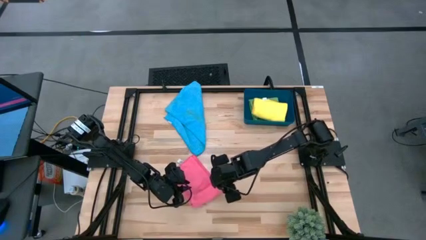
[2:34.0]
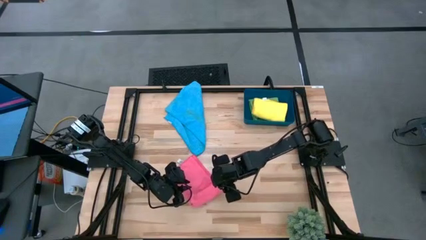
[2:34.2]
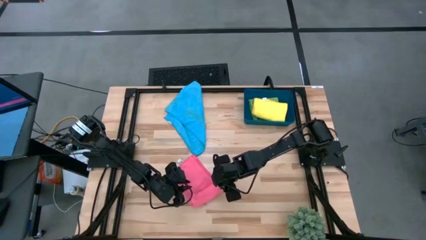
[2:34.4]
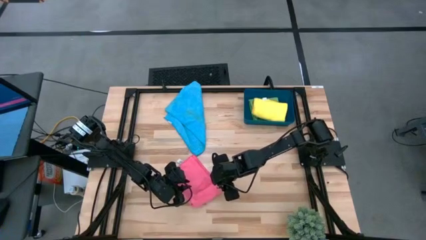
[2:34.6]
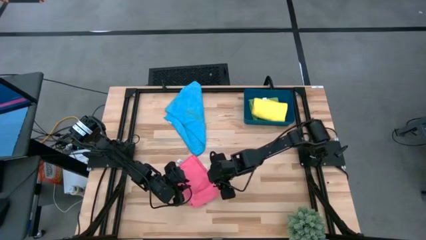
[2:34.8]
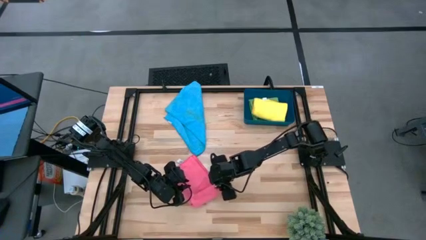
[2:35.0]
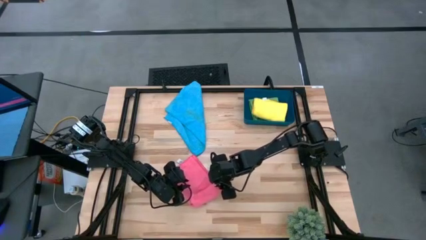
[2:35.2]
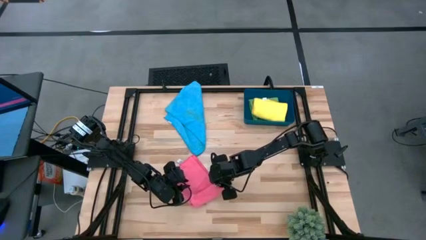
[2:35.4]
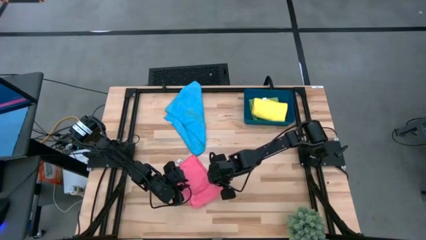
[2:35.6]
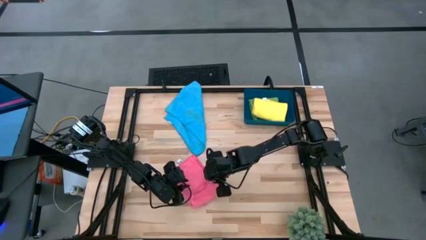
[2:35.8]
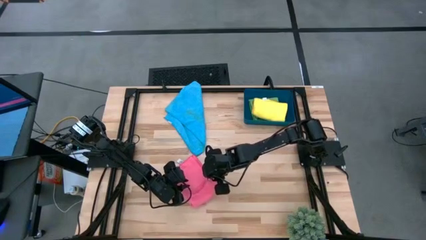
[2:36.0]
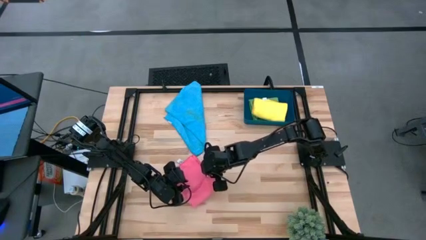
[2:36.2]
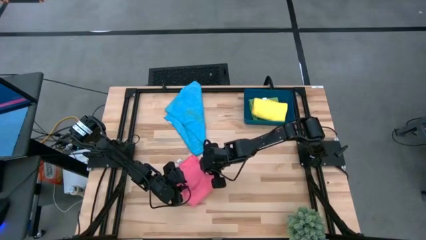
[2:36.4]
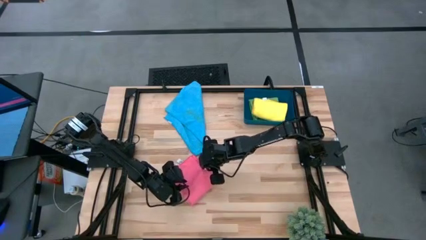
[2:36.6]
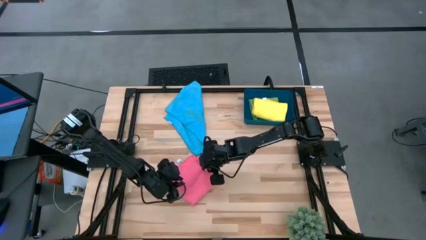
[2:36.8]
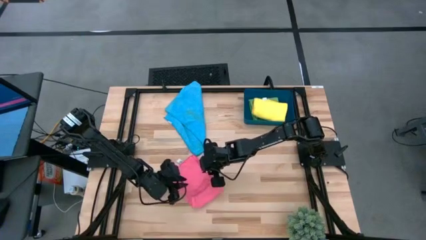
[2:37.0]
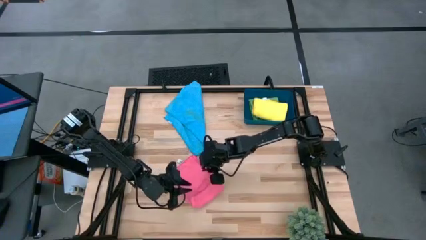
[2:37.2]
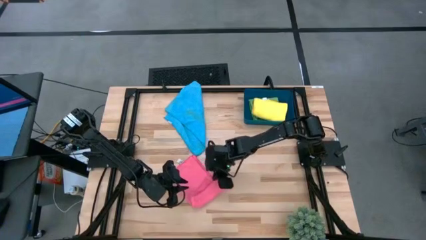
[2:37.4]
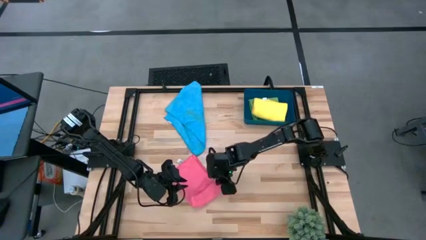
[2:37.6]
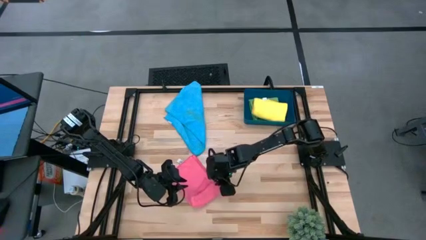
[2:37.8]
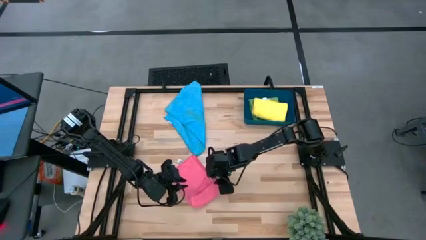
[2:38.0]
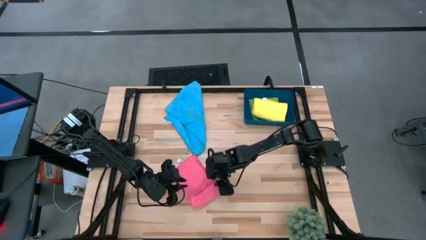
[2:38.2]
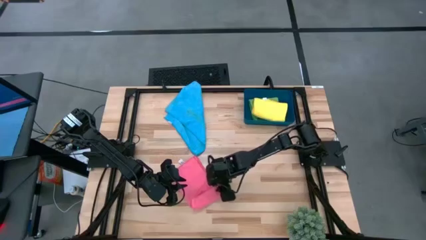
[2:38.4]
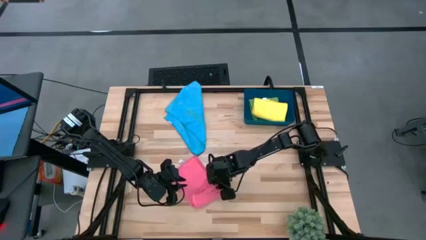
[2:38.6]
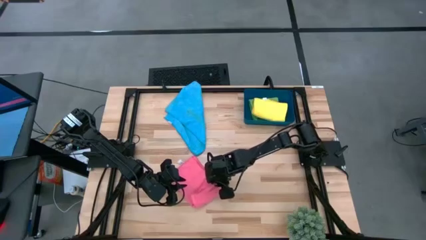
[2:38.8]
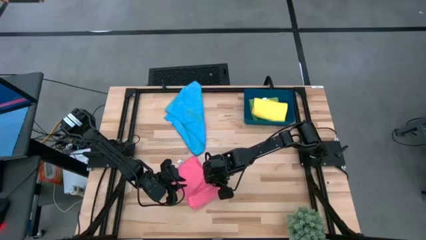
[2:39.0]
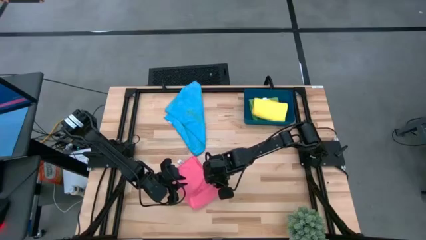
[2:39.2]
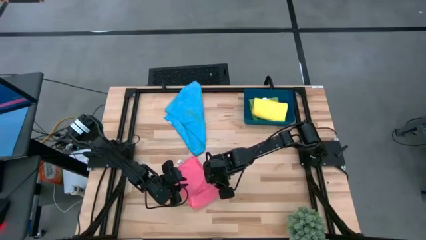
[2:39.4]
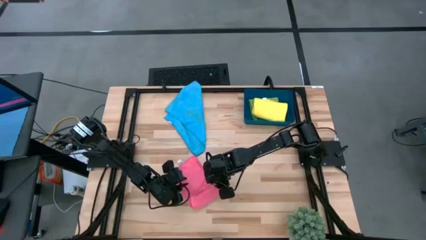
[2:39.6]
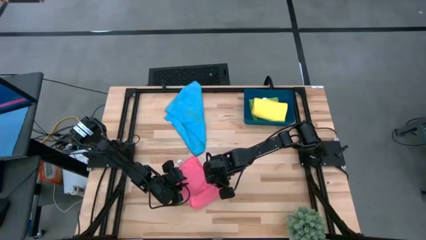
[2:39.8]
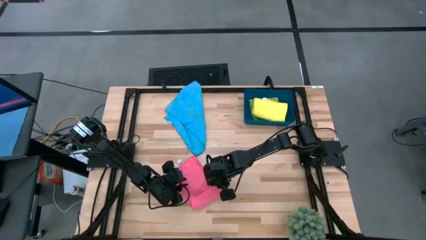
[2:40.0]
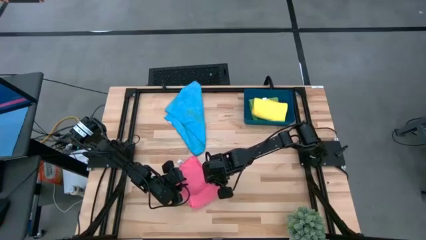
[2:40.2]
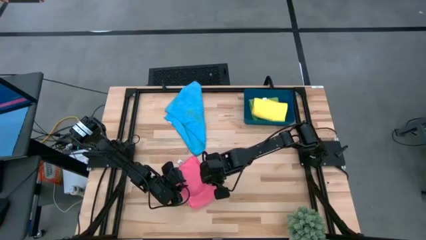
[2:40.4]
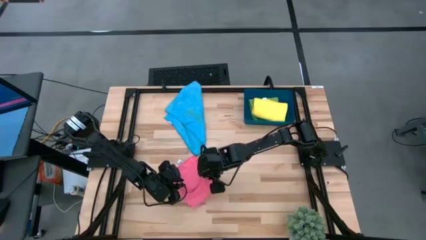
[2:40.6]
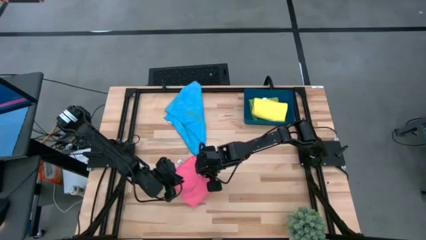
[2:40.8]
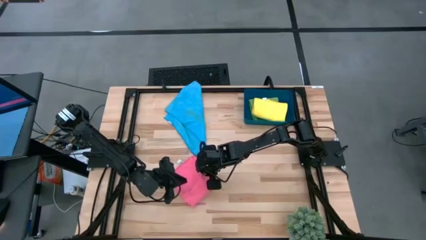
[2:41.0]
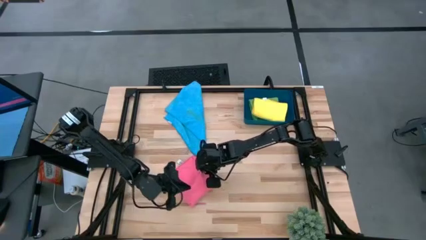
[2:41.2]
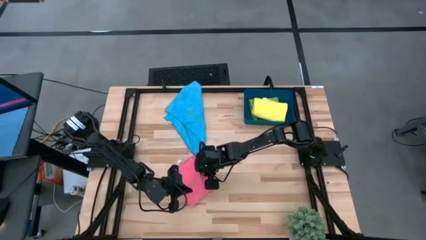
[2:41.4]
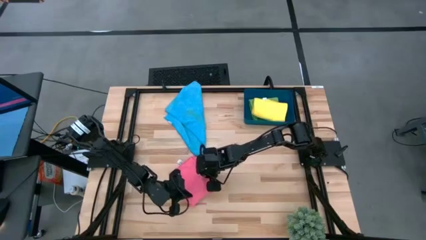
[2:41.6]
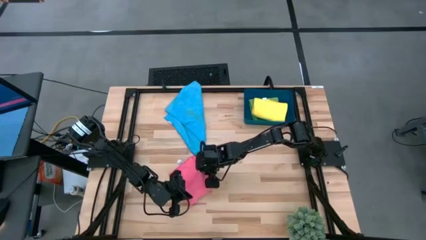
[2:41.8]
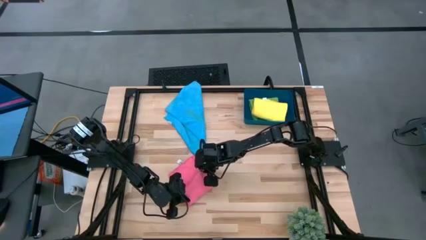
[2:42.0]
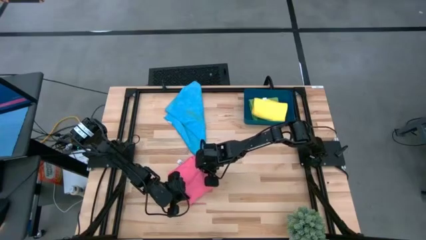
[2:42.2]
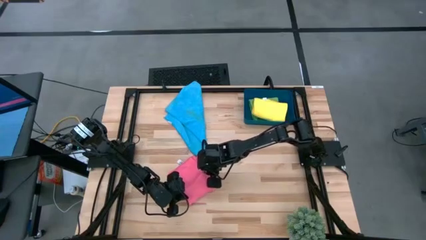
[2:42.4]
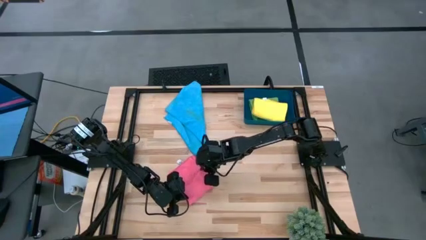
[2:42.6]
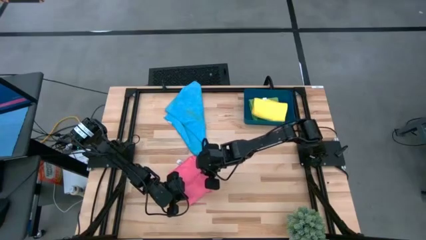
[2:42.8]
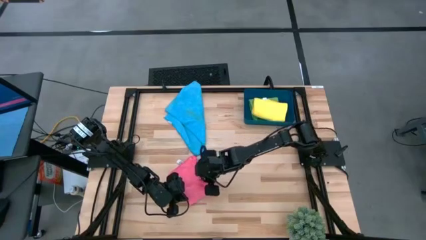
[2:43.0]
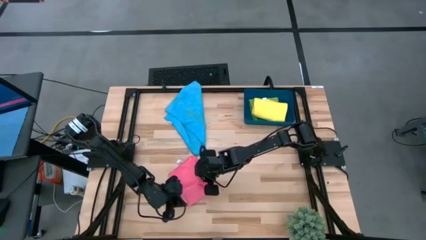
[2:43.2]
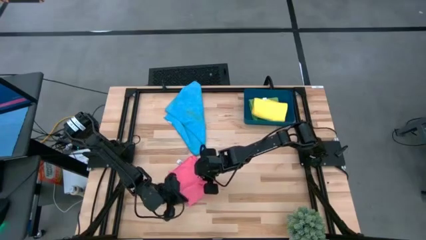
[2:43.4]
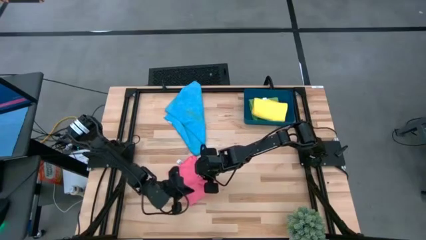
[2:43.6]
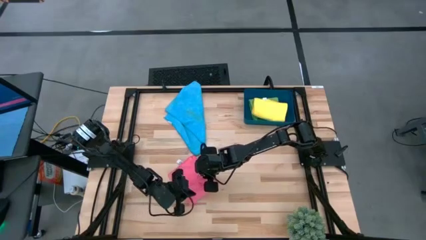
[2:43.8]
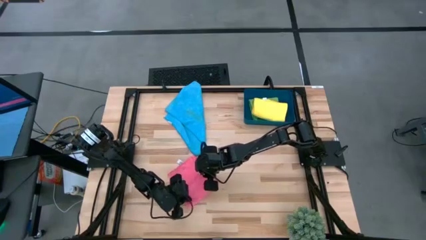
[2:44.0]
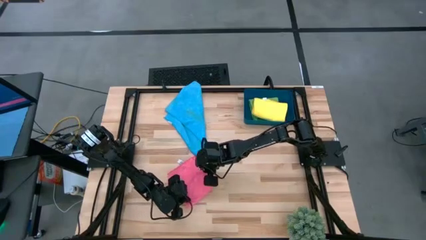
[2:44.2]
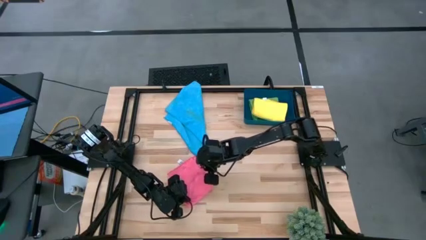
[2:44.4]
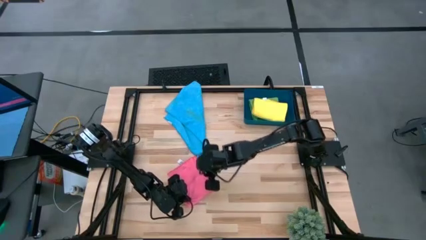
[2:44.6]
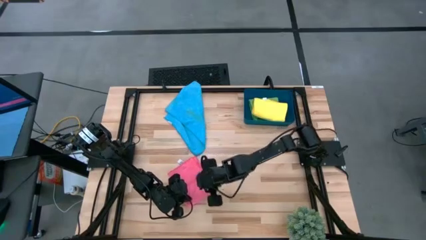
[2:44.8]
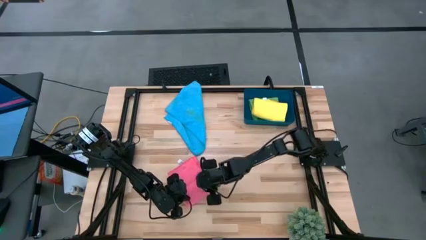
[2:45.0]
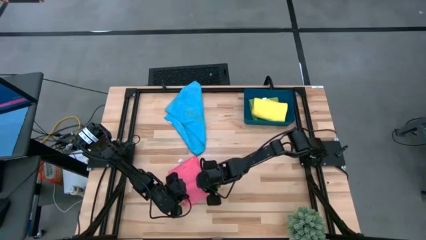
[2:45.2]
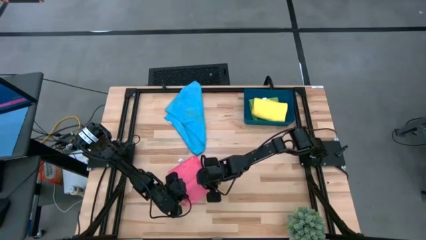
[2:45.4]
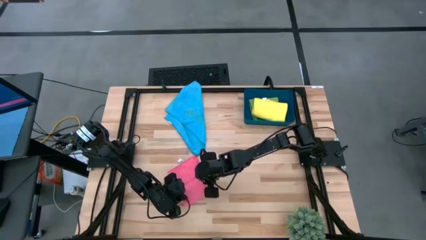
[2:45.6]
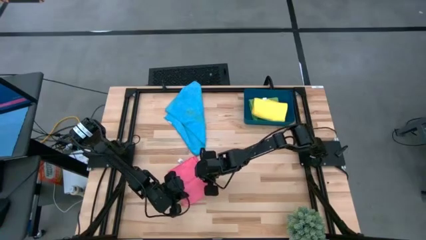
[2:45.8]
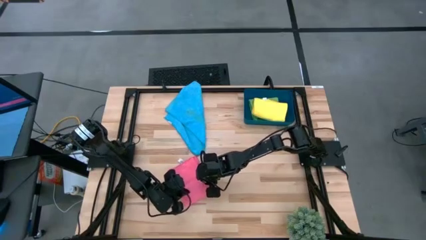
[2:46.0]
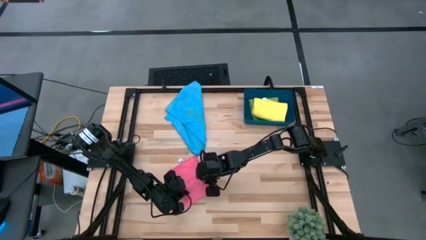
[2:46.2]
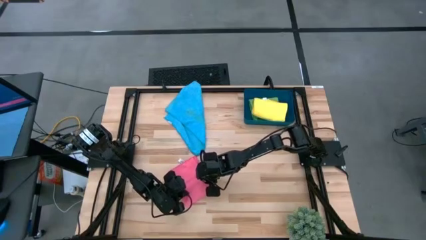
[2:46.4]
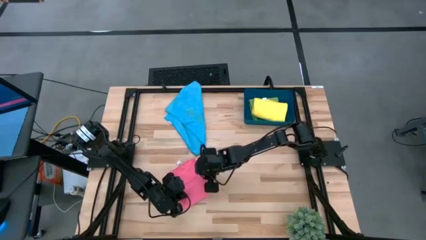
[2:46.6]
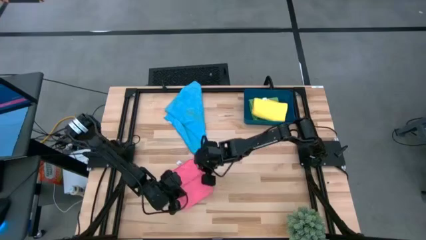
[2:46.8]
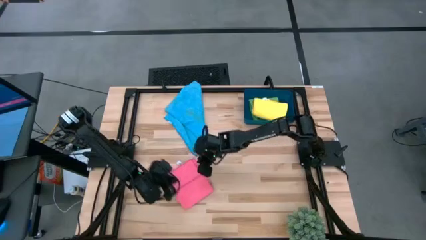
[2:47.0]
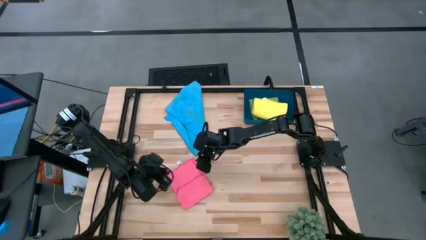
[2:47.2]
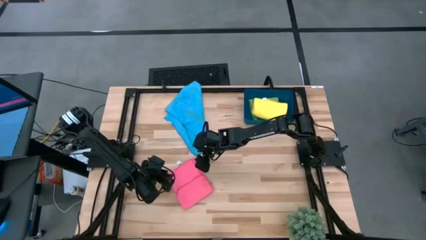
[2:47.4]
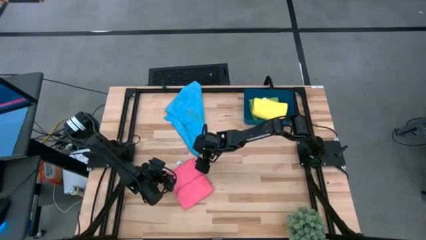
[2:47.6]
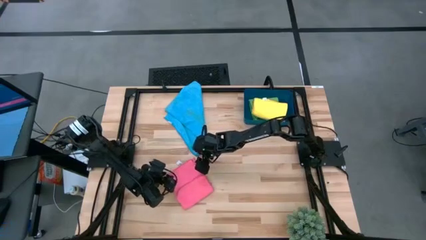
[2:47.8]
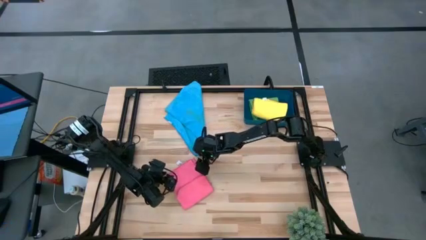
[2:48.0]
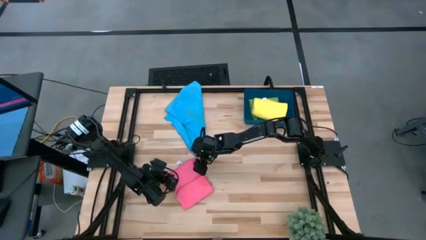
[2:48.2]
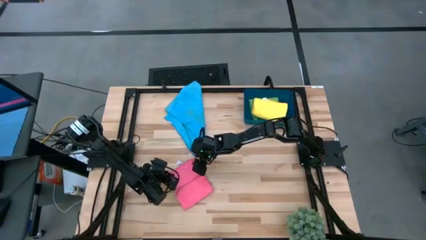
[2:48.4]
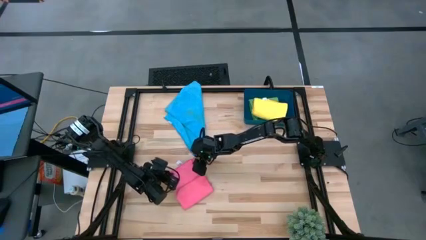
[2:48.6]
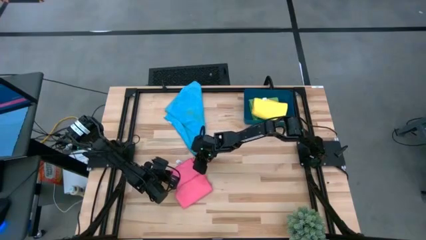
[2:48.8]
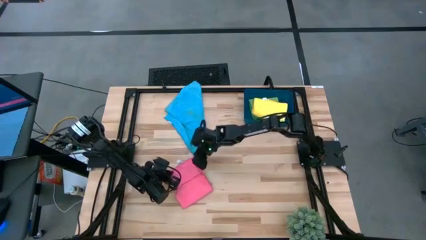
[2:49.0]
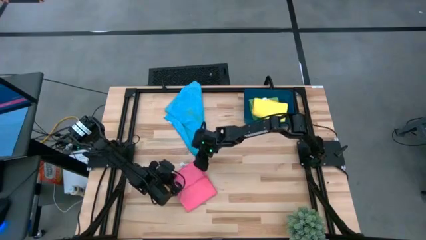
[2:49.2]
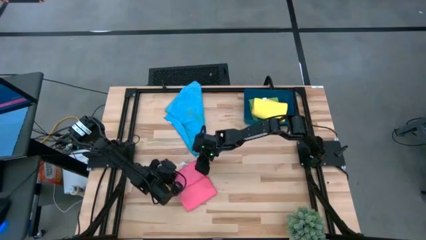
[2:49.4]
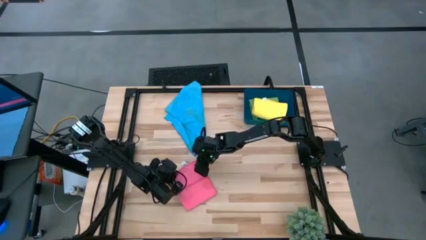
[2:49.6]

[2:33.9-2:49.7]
Task: Fold microfiber towels
Fold the pink microfiber towel

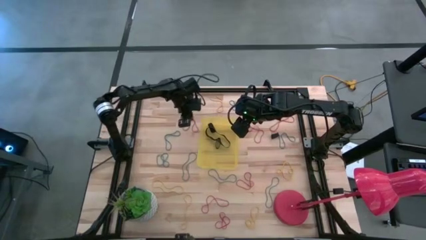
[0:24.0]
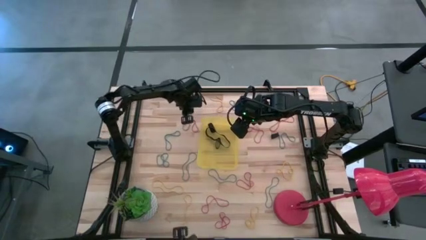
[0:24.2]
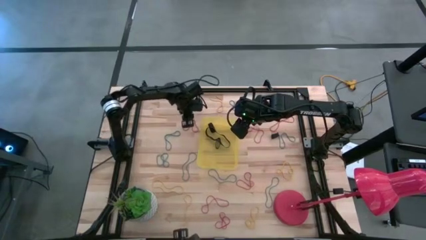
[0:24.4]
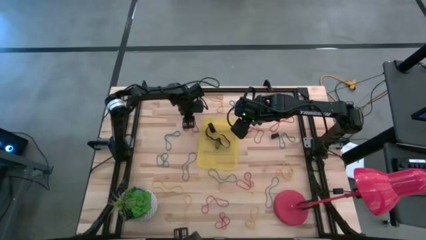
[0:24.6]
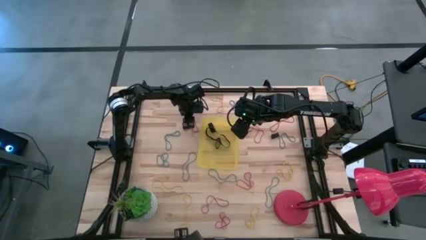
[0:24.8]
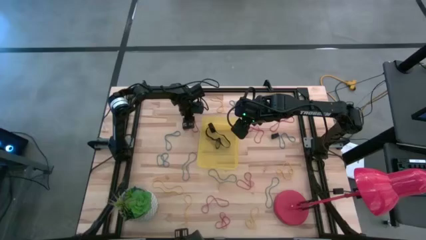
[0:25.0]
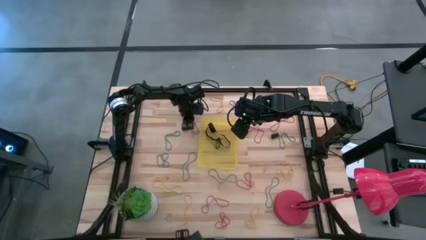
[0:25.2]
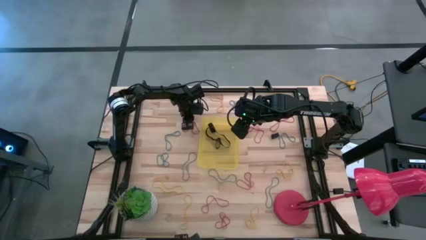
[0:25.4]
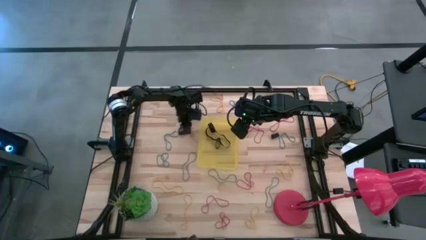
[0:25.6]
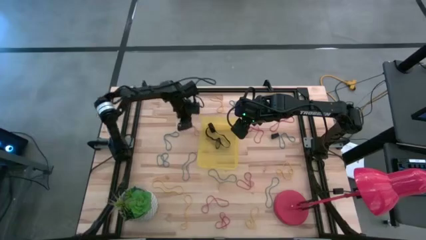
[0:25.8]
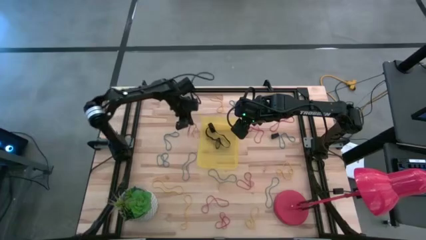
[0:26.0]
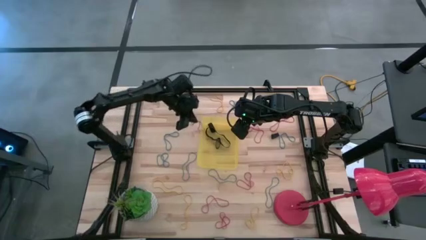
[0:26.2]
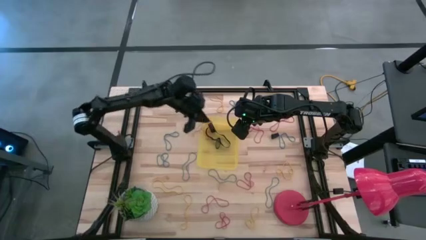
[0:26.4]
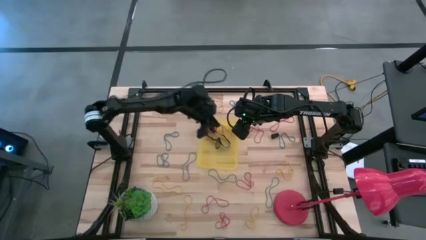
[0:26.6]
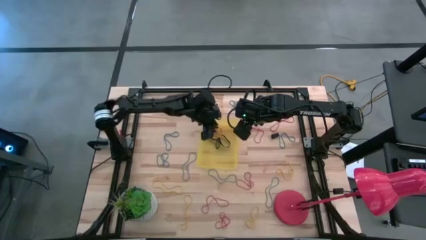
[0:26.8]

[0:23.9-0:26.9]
Task: Pick and place rubber bands into bin
Put the red rubber band into the yellow bin
